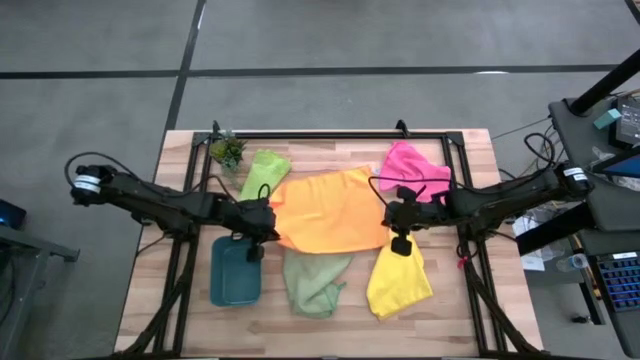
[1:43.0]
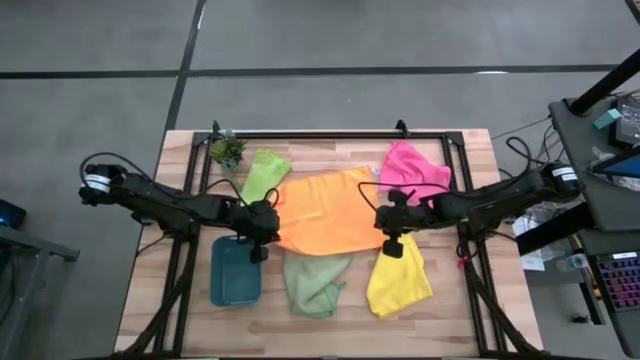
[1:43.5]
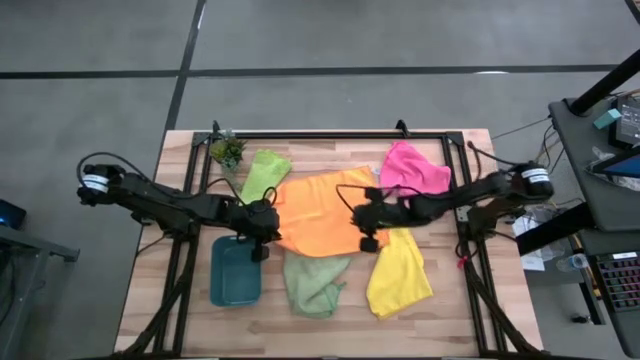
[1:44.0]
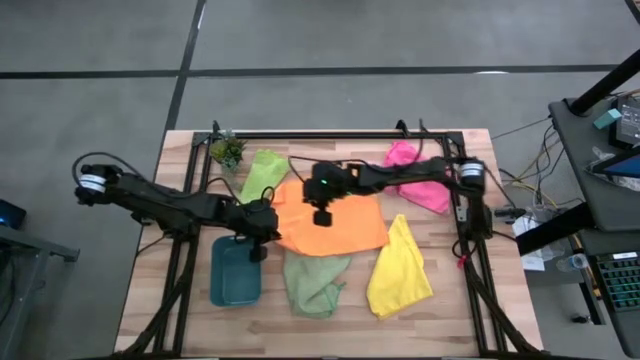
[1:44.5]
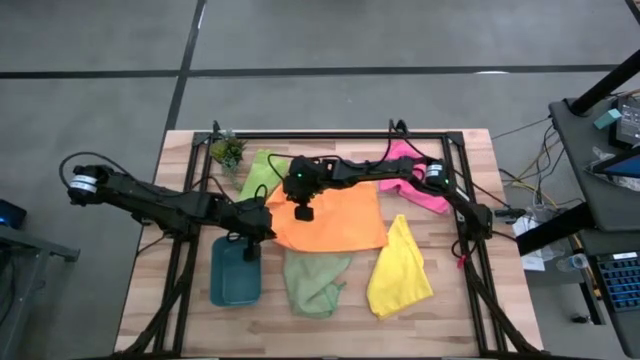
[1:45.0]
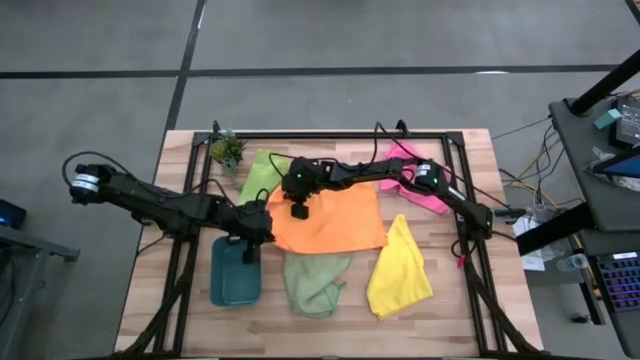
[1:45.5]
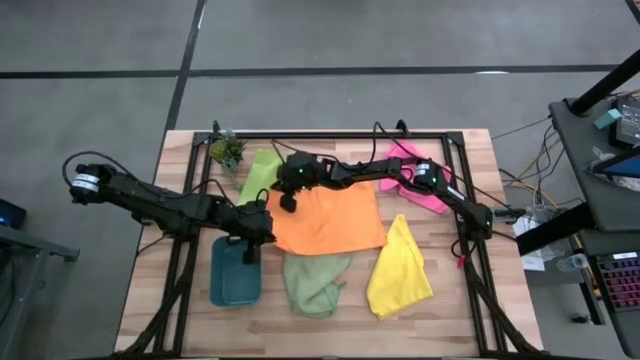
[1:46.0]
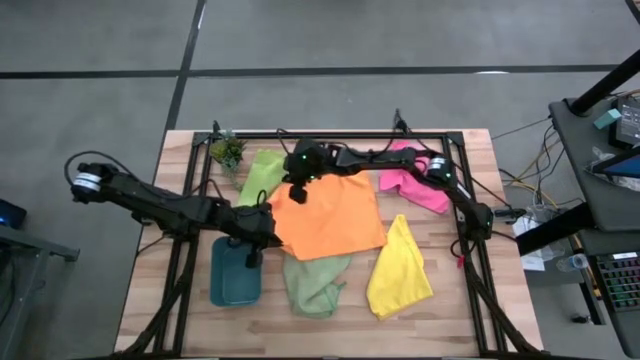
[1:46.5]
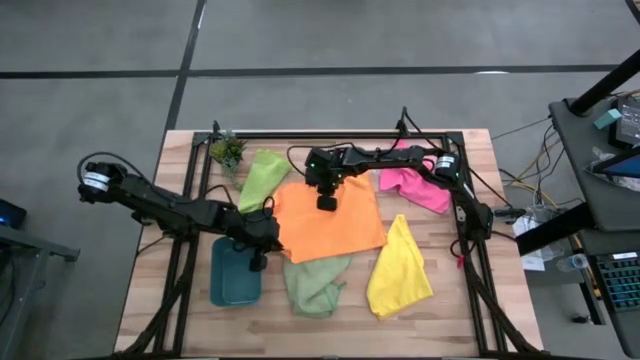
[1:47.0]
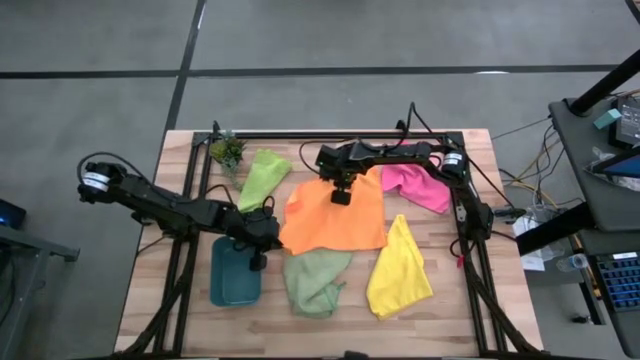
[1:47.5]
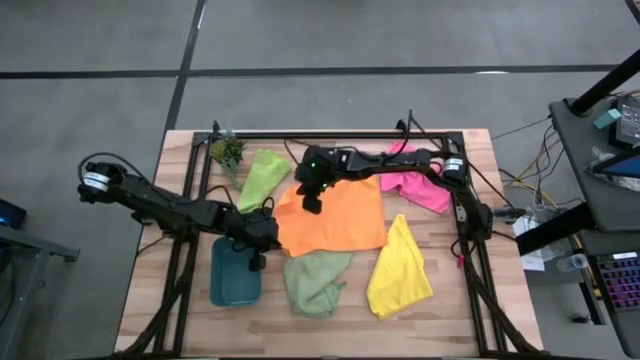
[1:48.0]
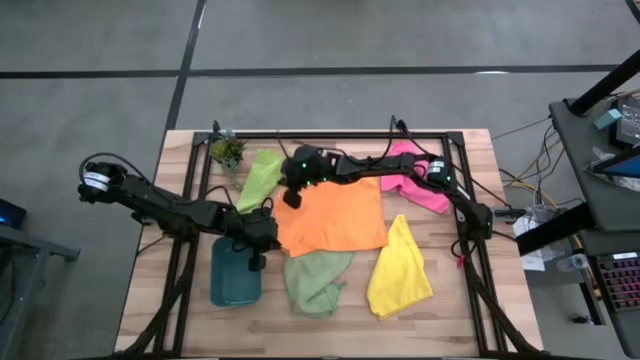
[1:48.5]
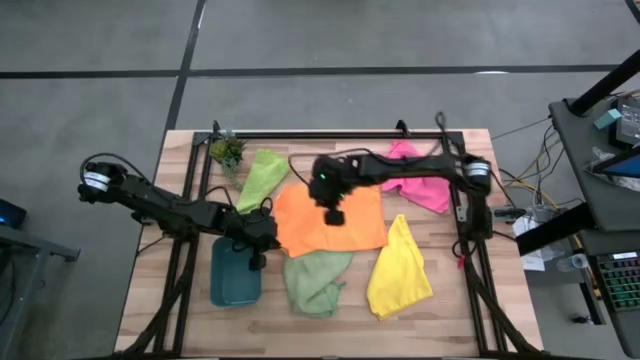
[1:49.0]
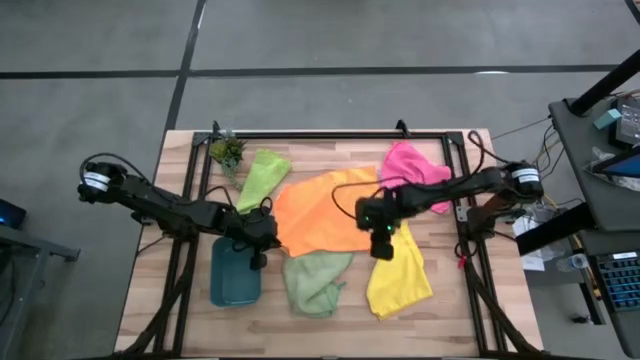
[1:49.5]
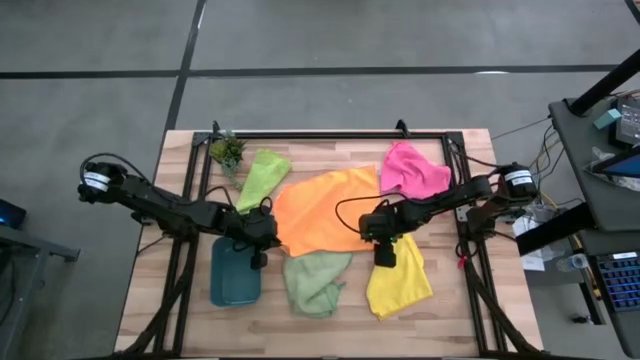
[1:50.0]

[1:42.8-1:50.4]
Task: Fold microfiber towels
Fold the orange microfiber cloth

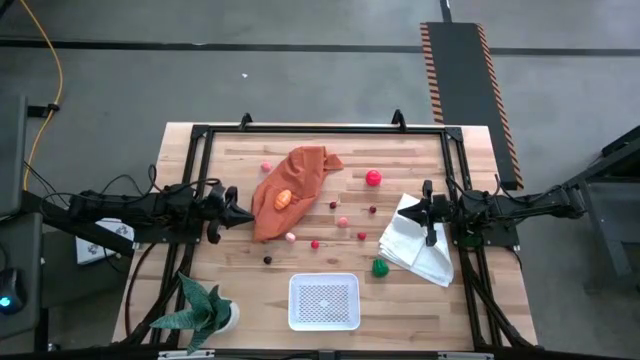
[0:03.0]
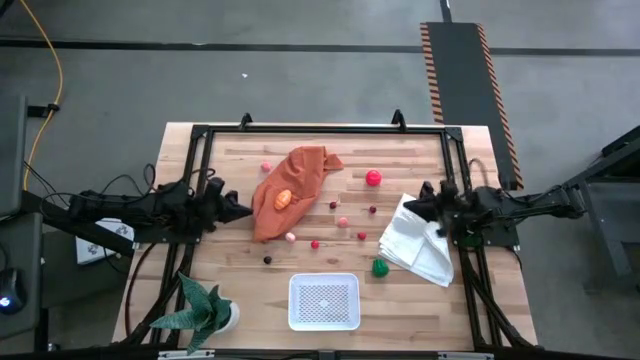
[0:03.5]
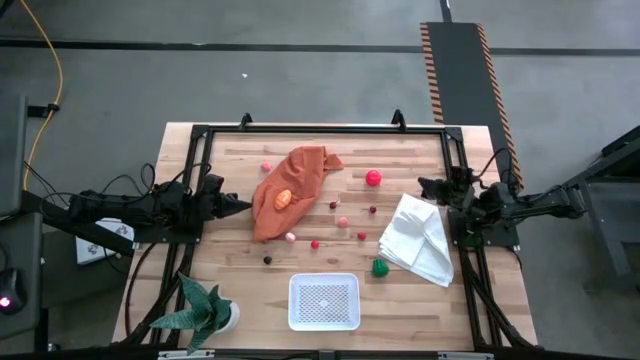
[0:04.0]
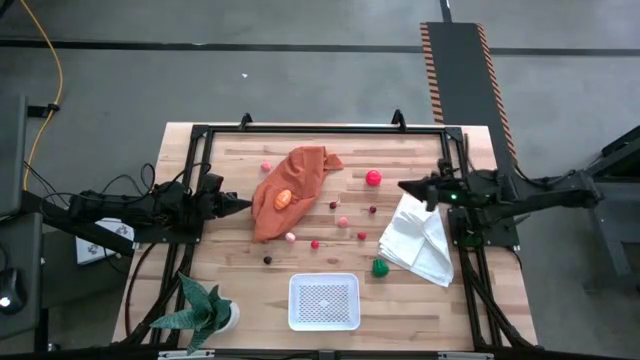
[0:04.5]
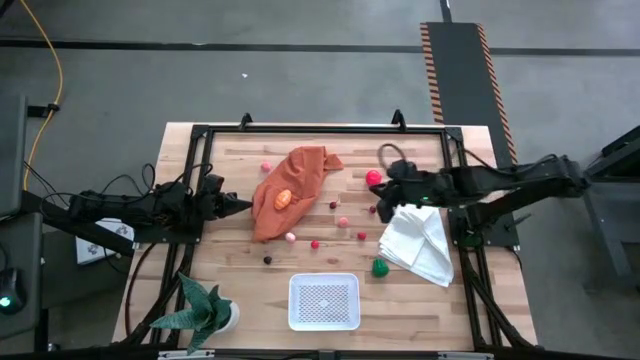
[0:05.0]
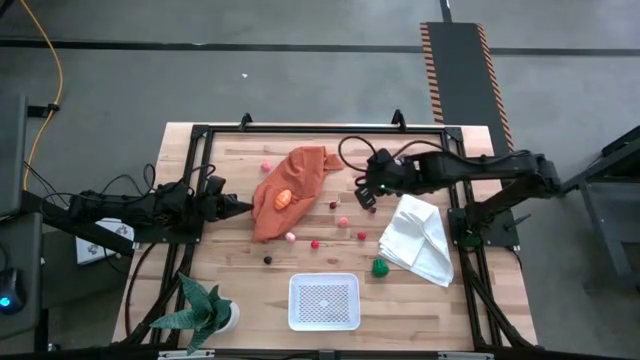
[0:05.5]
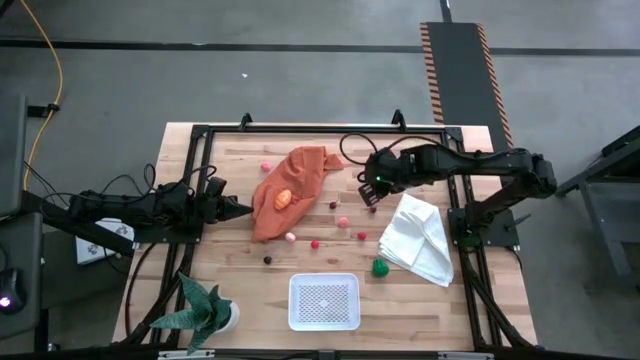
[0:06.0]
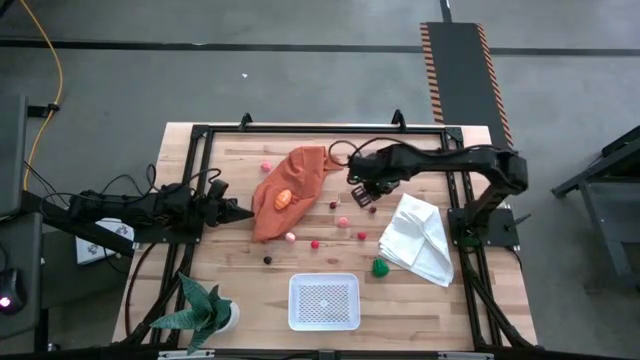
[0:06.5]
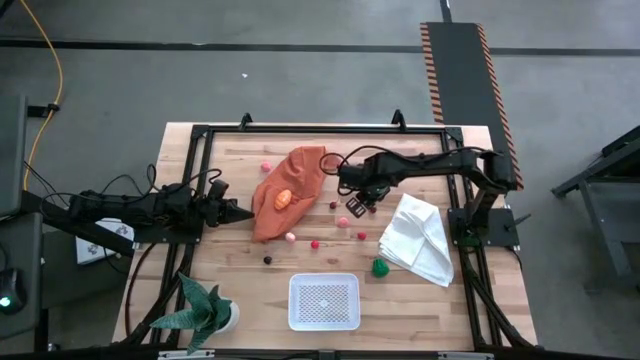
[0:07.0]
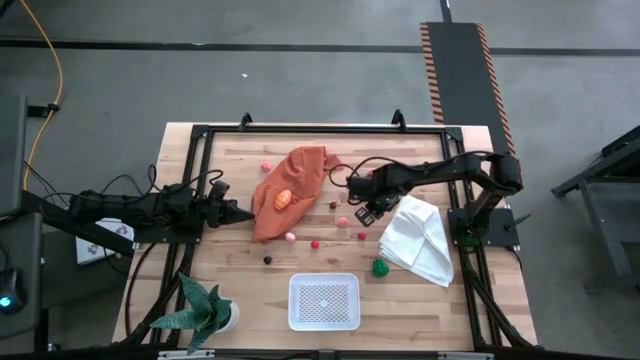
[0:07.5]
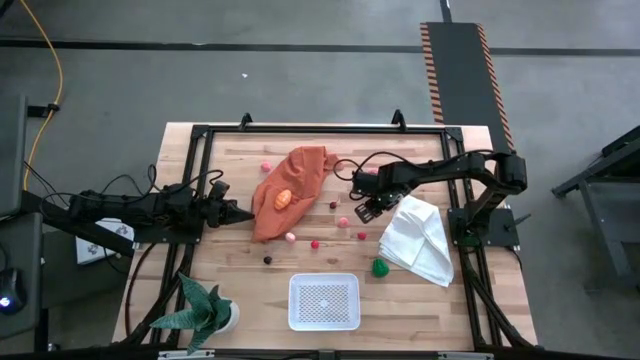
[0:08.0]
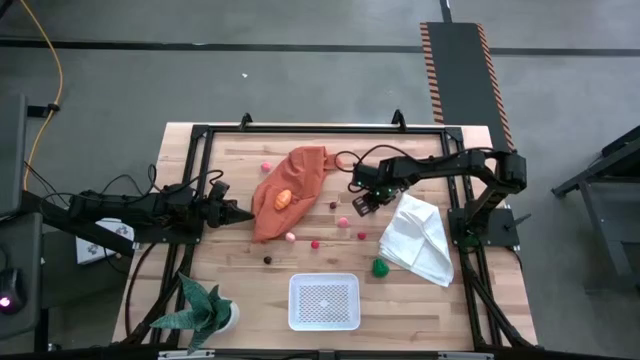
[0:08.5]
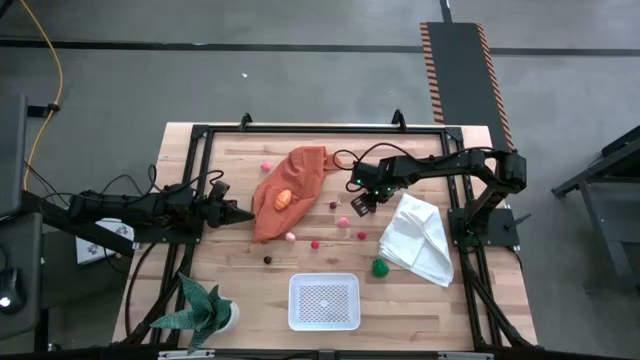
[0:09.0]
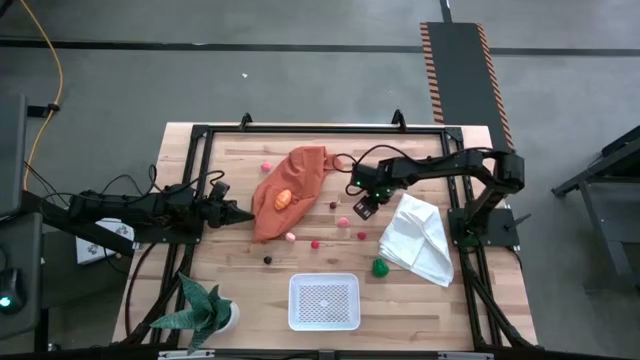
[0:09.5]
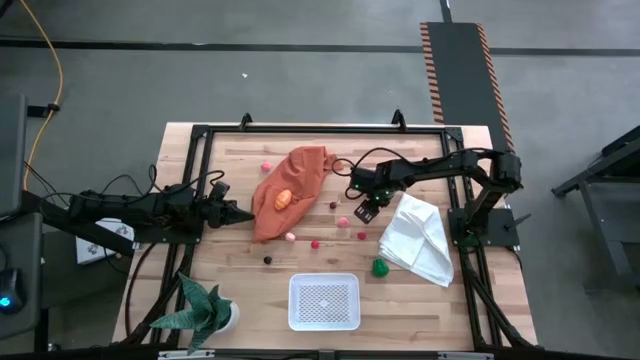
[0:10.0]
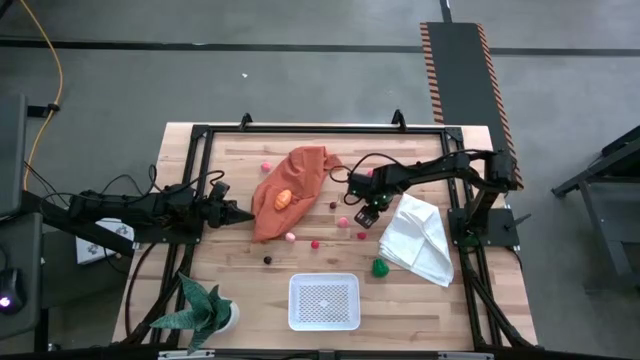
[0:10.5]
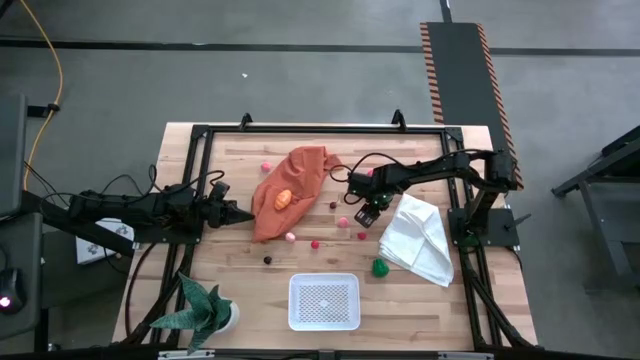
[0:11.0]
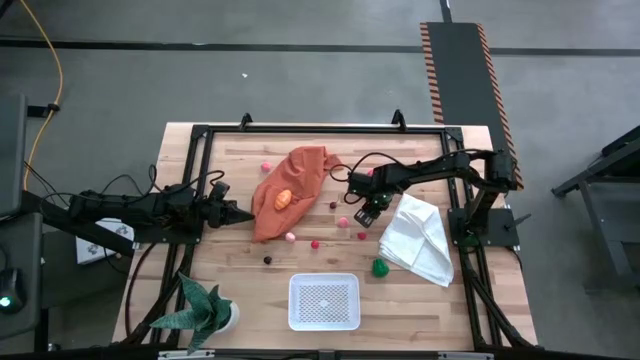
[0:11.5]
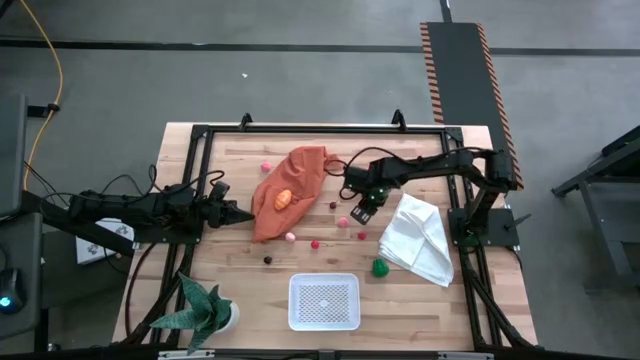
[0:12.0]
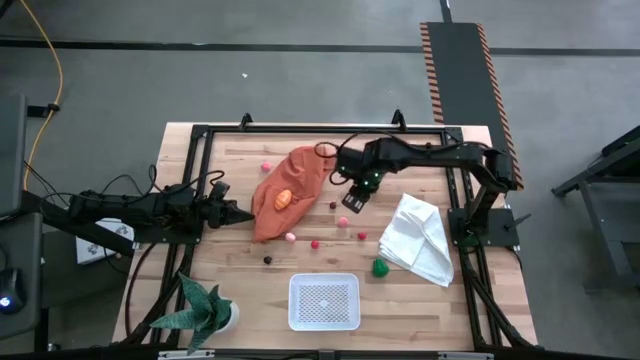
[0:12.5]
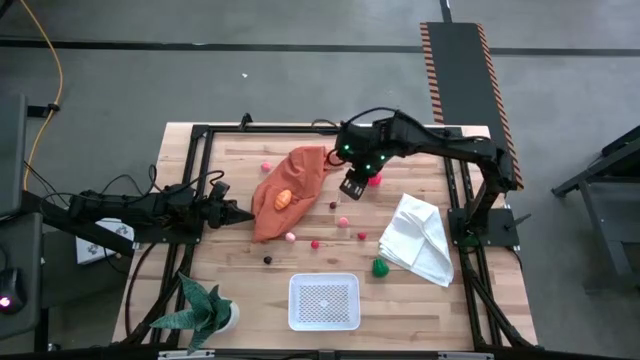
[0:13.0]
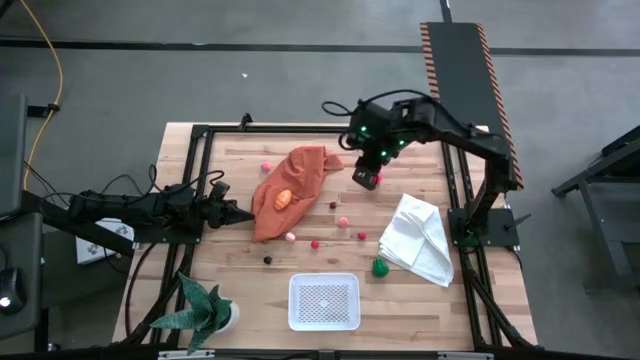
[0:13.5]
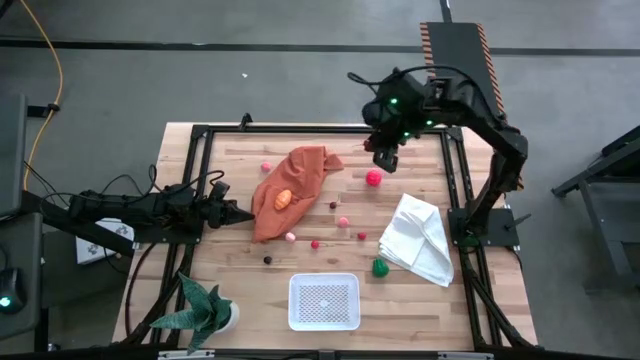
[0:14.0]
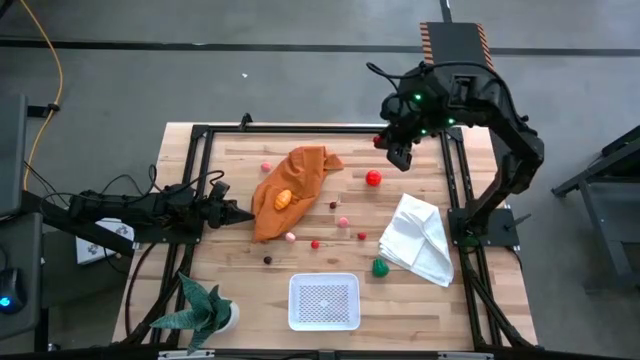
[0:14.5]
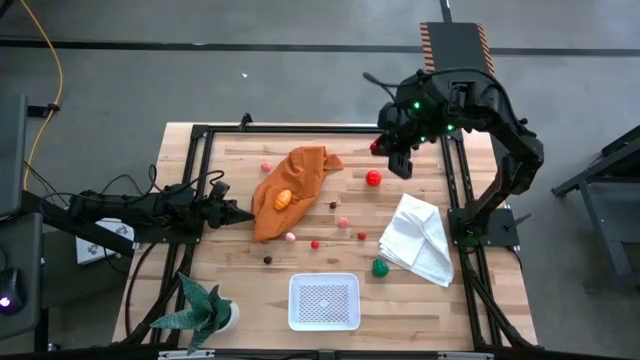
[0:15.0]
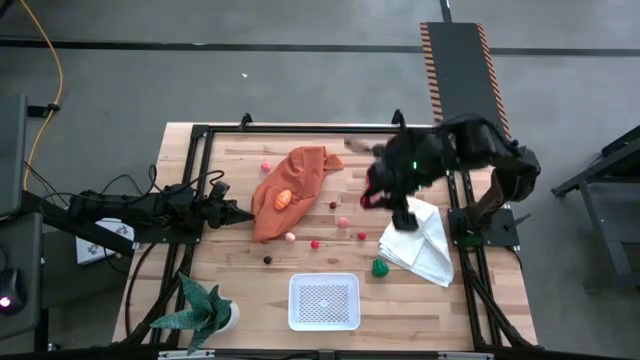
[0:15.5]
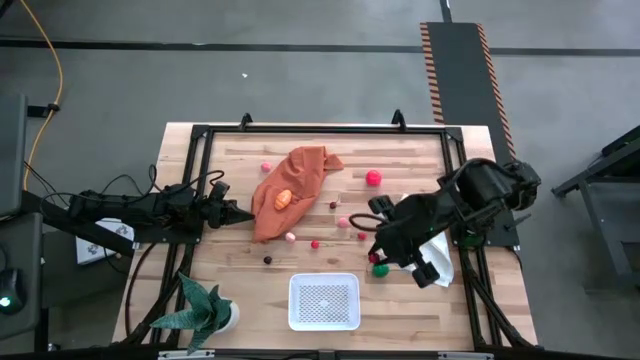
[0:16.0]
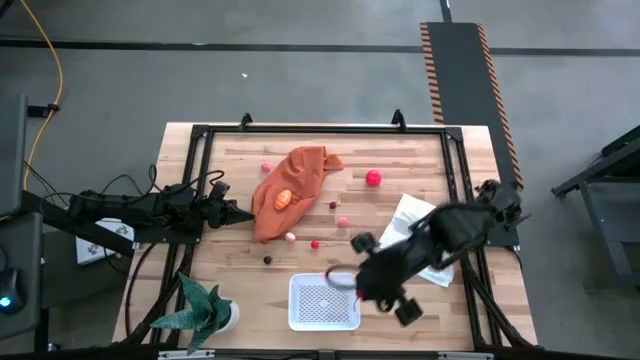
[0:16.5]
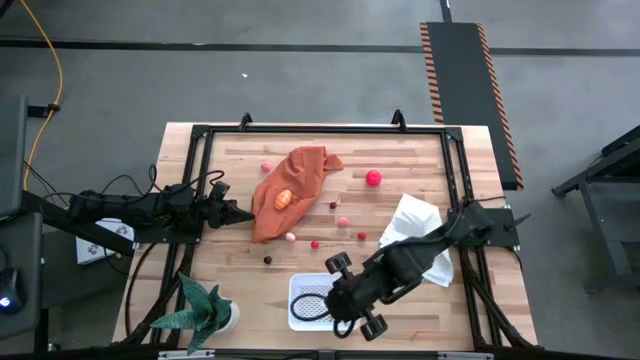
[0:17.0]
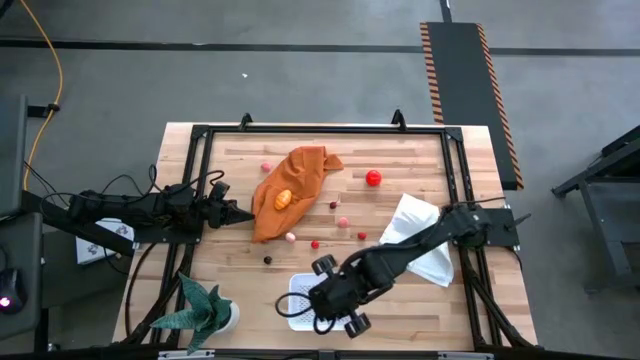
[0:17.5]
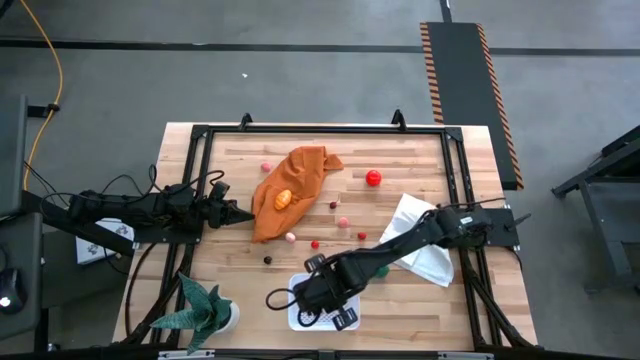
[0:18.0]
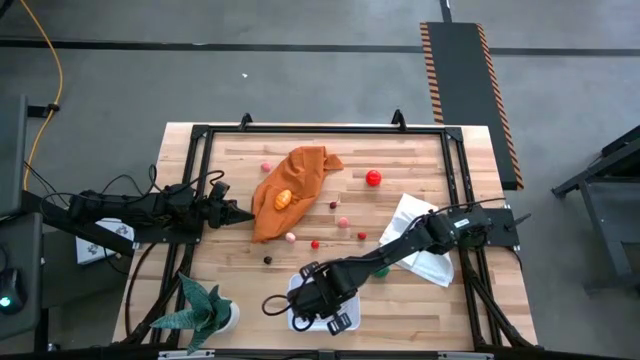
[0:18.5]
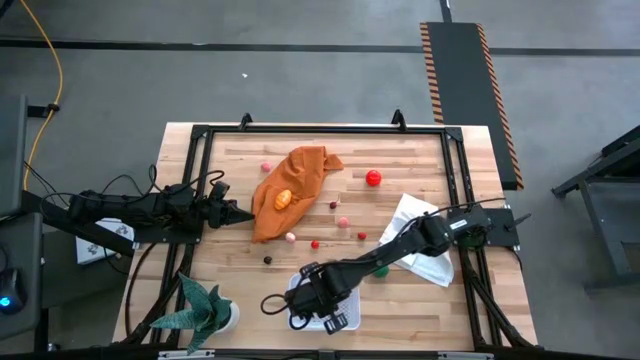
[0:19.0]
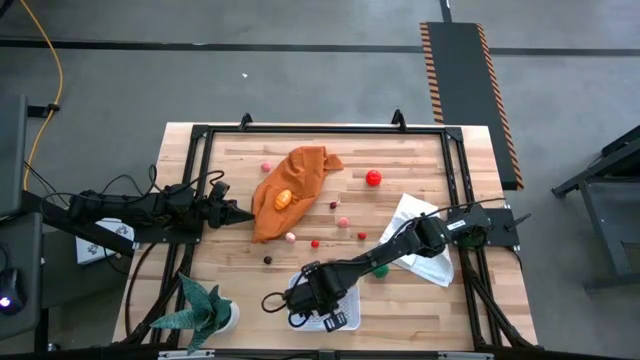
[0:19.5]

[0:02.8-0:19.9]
Task: Pick and placing Produce into tupperware
Put the right red cherry into the white bin
